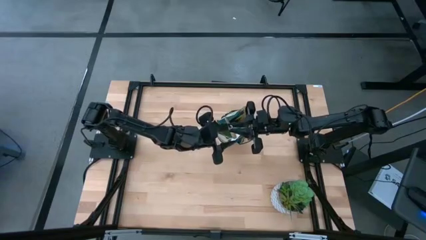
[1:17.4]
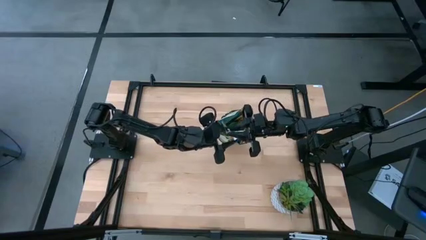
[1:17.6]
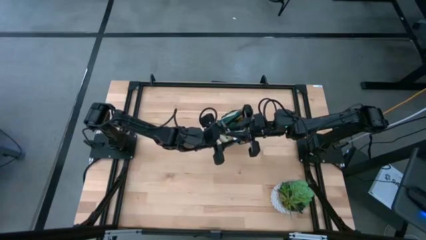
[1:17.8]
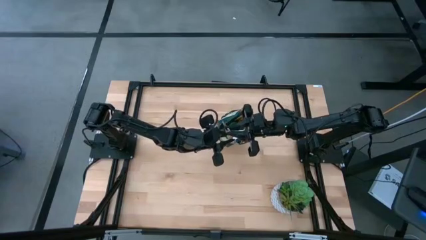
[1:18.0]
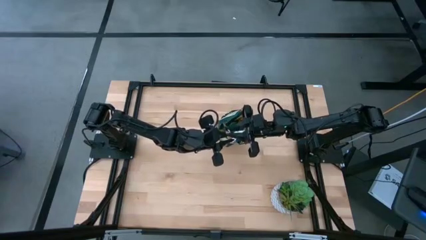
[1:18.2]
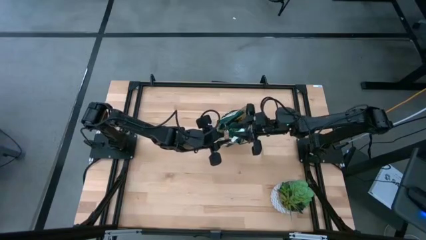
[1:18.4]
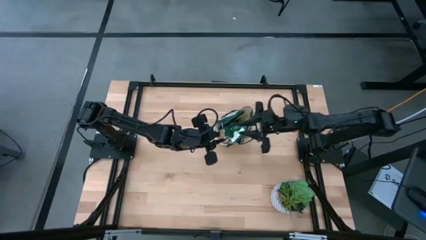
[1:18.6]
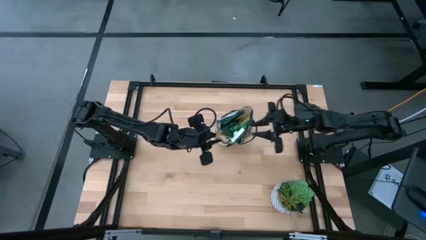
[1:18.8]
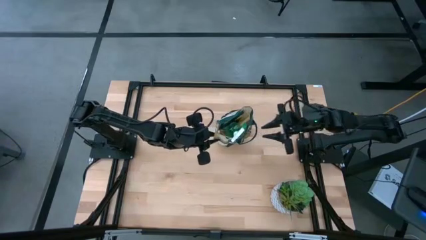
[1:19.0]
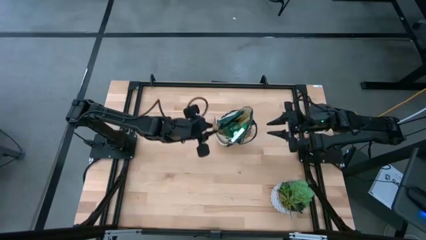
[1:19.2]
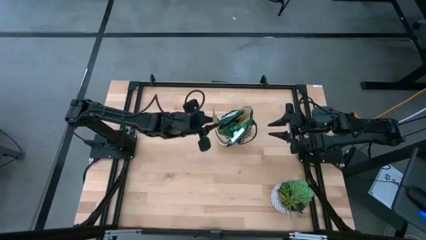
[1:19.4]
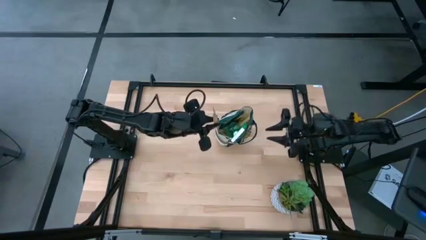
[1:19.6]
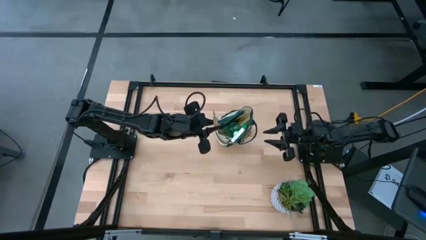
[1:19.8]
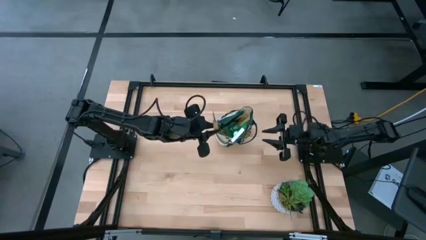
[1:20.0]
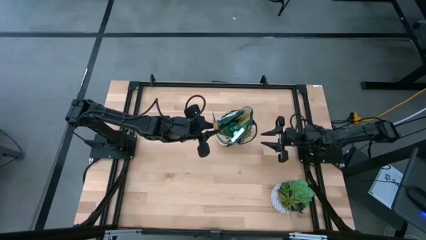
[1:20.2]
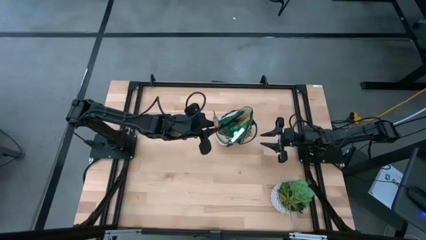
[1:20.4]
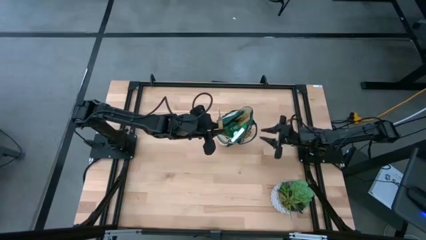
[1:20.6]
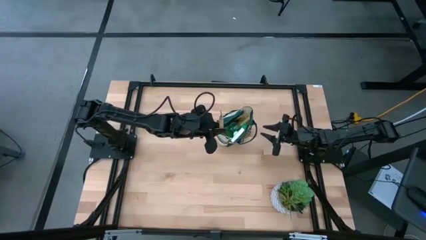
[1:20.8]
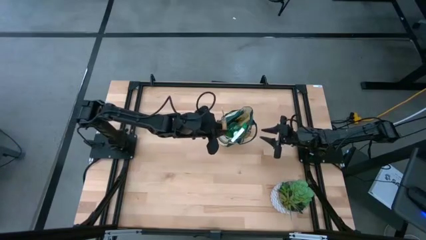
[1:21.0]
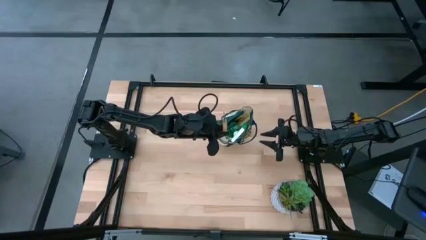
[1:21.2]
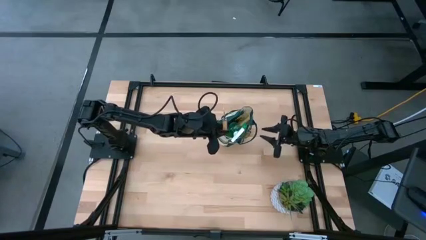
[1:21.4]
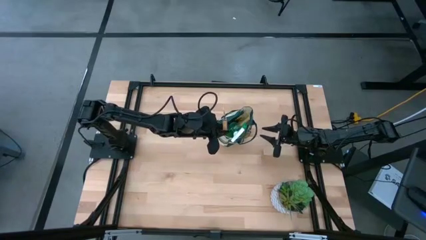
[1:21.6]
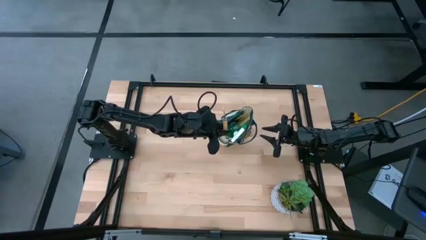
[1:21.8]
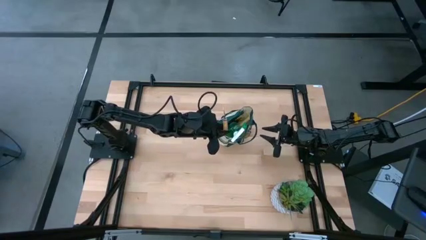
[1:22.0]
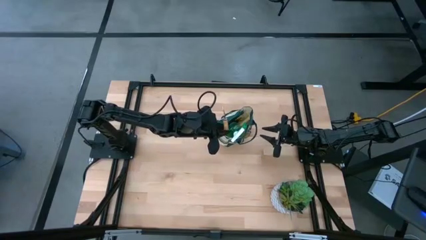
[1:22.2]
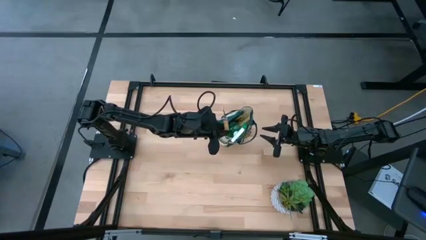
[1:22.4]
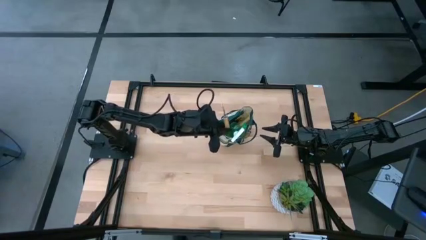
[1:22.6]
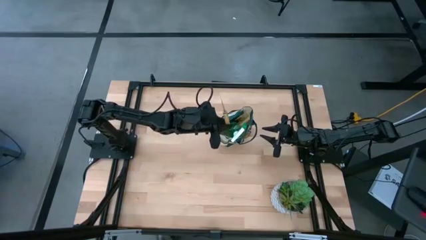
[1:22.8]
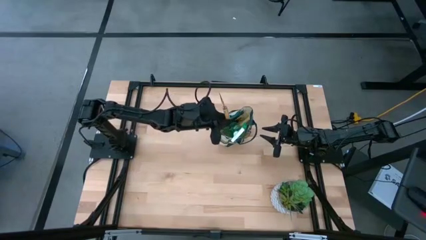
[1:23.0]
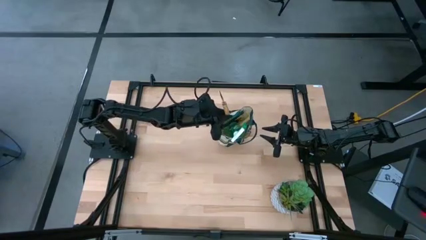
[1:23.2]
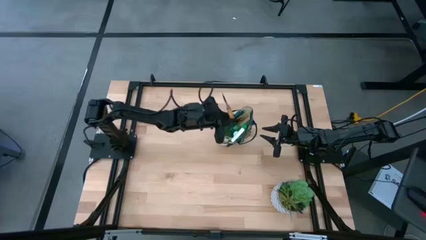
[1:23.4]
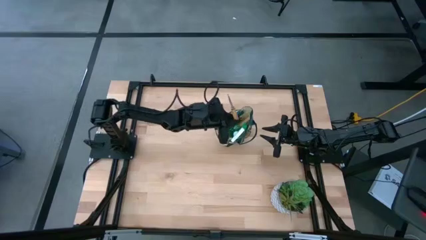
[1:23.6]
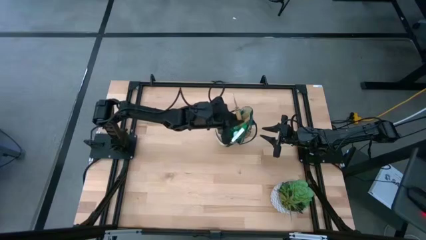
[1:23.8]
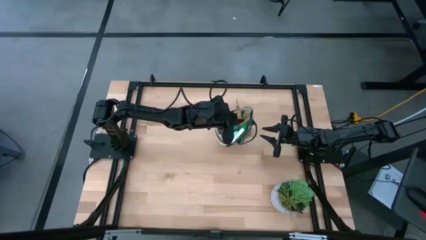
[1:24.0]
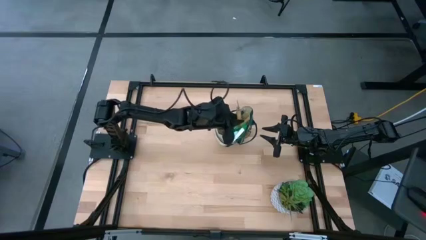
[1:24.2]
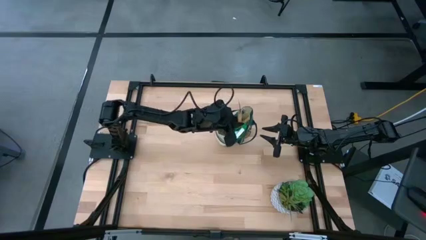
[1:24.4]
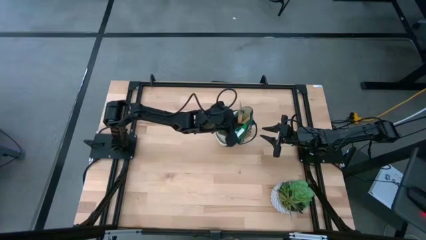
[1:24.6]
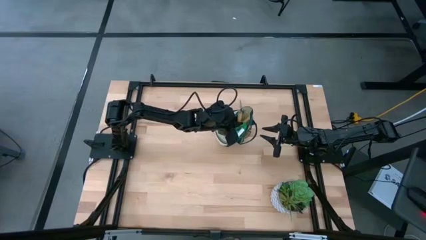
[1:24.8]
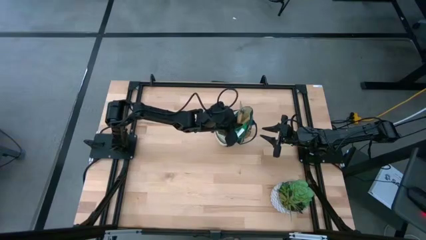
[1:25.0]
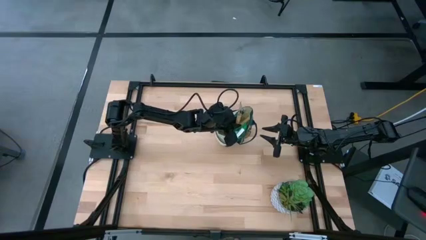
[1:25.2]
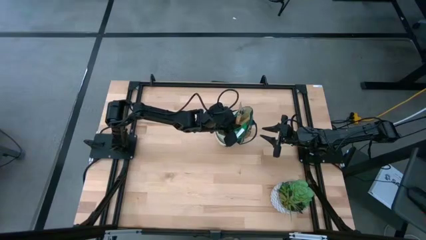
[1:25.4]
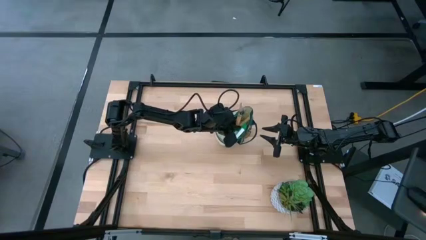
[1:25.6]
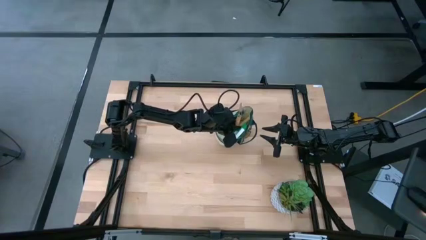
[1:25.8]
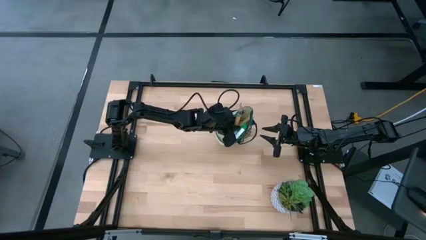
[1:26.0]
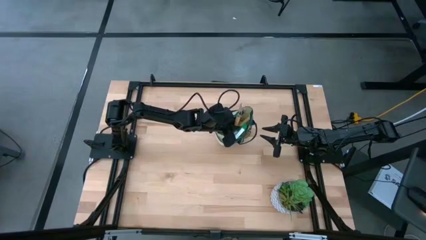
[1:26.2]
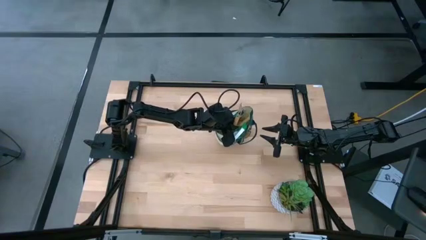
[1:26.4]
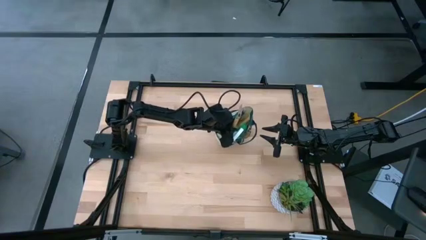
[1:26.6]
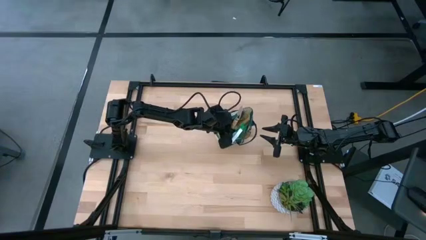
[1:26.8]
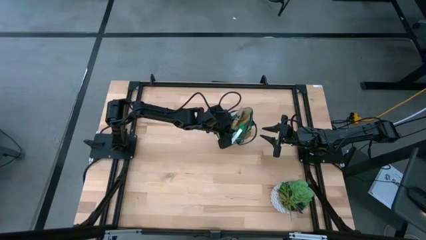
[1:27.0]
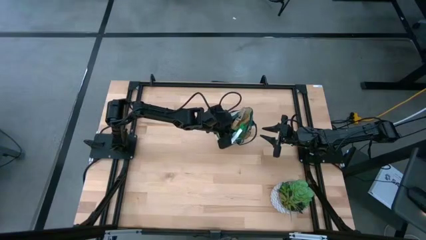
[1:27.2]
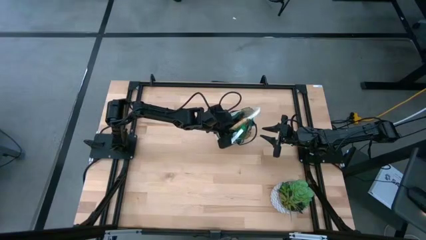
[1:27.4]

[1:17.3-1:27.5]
Task: Pick & Place Garden tools in Gardening bag
Put the brown trowel into the green gardening bag

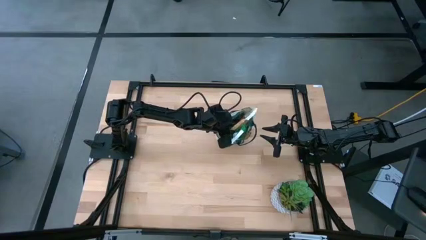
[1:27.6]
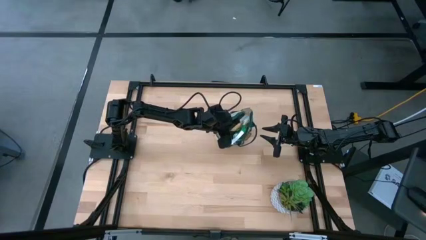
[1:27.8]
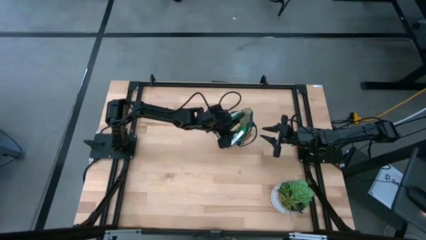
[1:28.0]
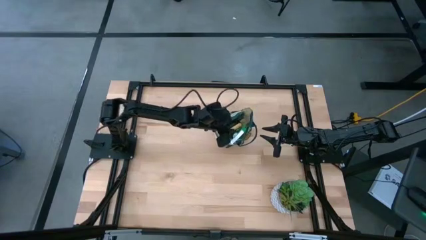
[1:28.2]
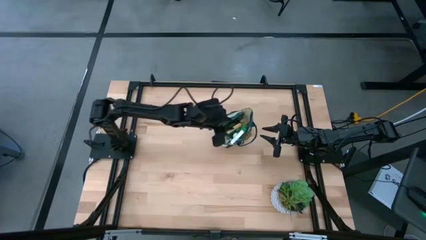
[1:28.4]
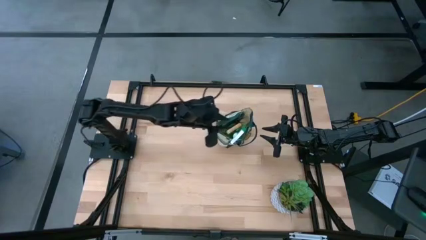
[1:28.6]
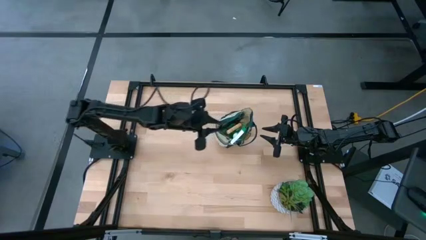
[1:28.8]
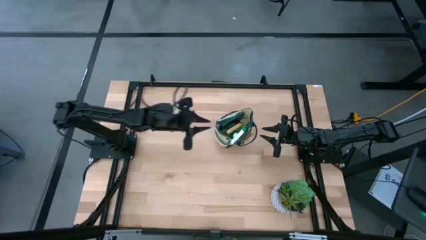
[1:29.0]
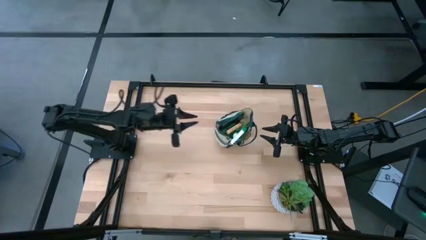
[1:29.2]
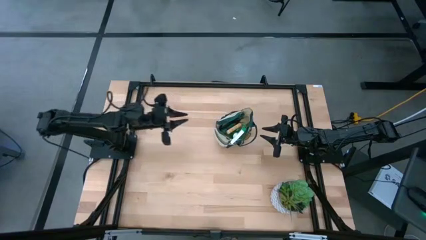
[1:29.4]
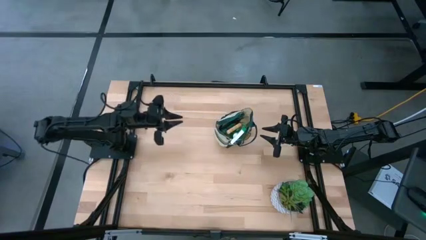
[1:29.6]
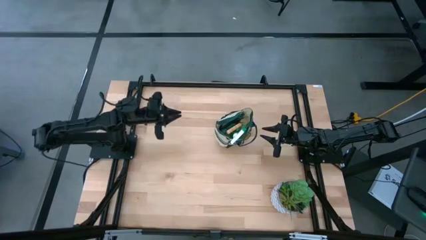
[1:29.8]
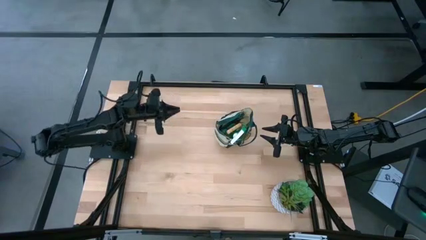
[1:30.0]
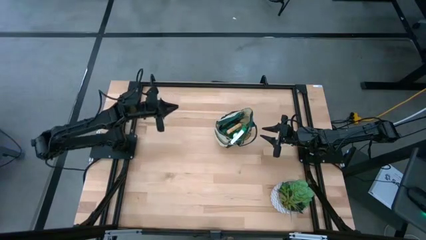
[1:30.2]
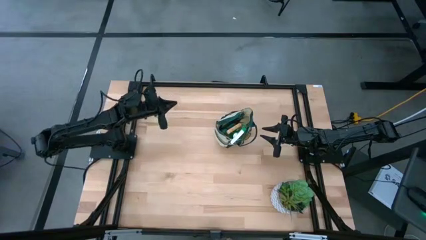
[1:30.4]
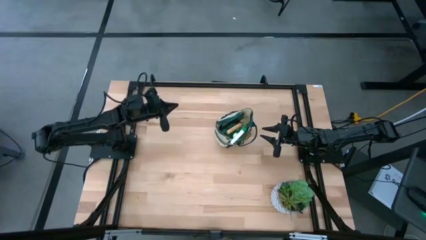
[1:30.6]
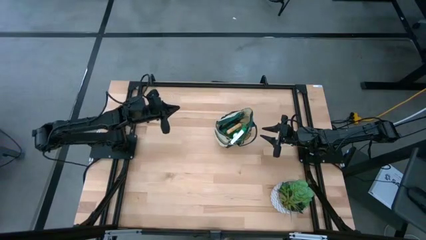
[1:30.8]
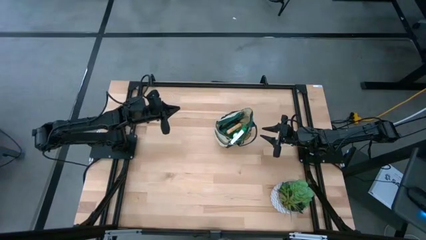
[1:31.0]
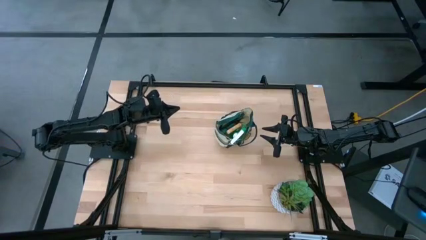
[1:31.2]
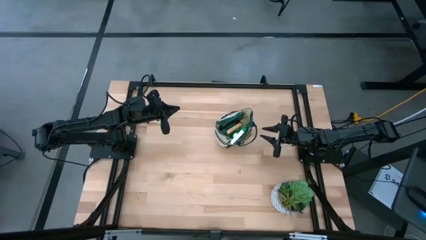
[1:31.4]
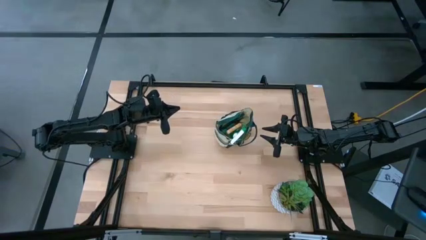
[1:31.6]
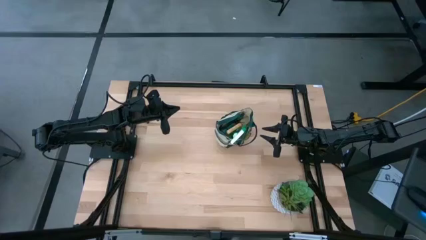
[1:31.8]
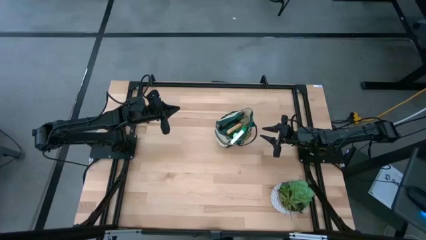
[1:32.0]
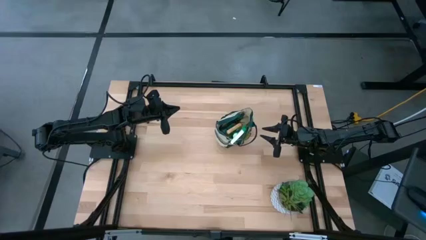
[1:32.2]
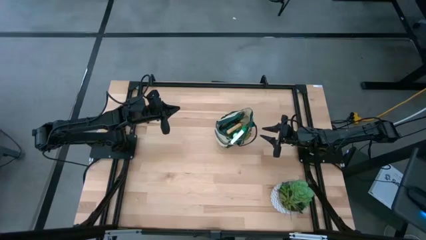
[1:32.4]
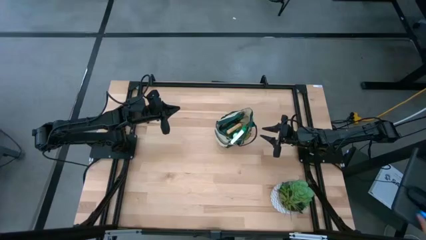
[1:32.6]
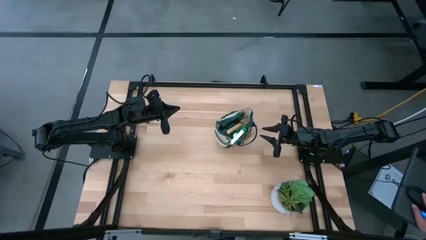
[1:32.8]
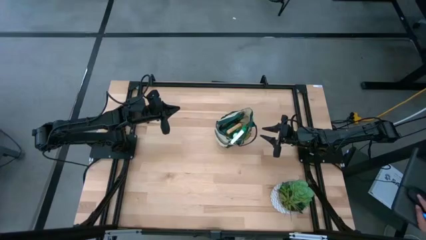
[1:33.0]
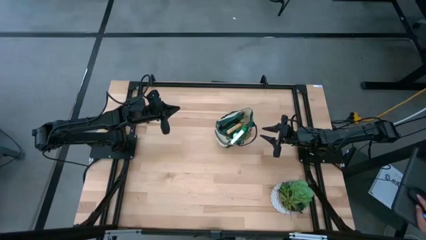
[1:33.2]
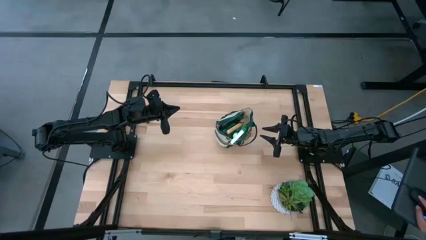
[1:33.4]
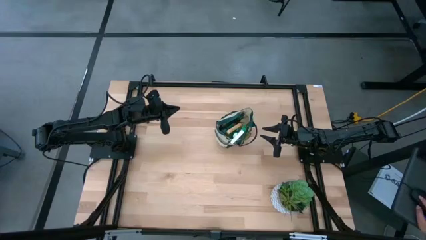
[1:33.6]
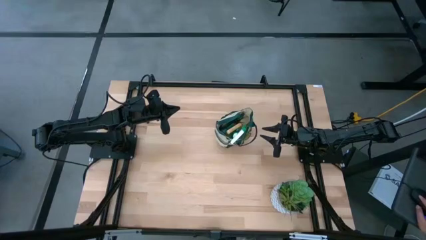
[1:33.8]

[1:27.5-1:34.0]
Return to Home Position
